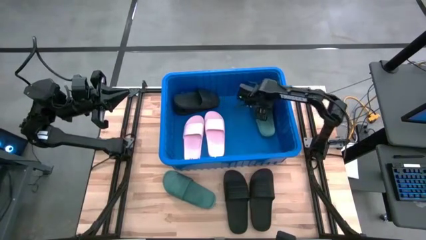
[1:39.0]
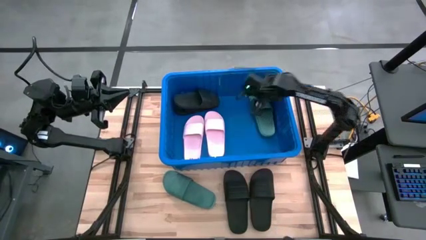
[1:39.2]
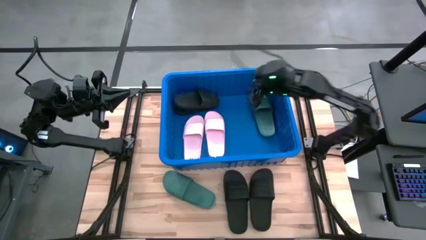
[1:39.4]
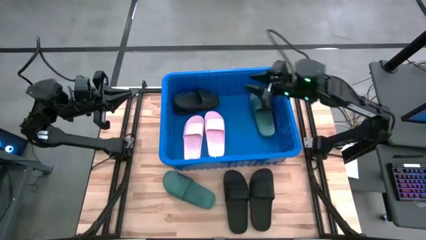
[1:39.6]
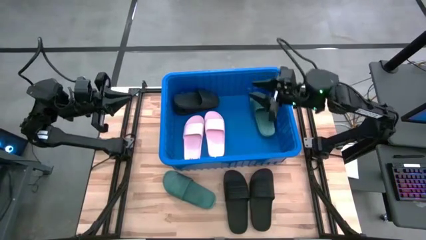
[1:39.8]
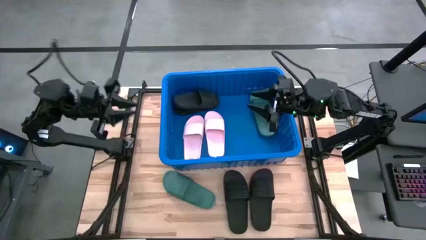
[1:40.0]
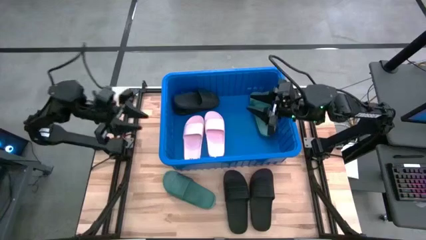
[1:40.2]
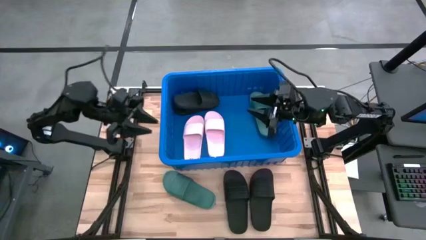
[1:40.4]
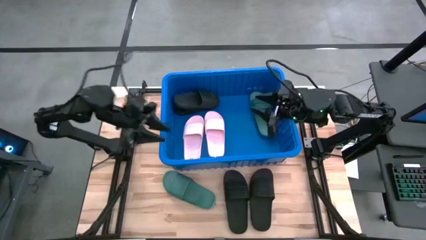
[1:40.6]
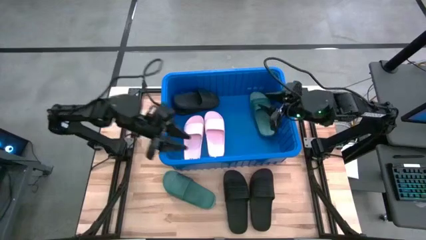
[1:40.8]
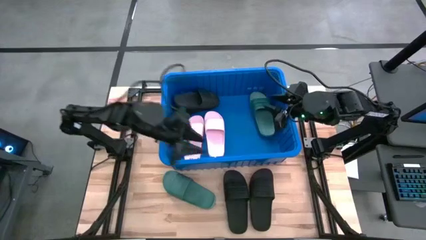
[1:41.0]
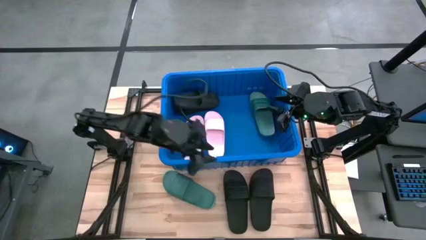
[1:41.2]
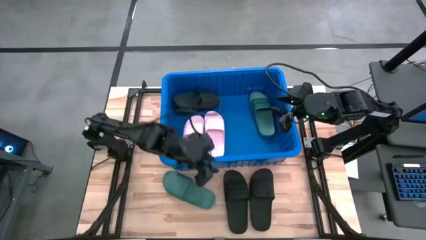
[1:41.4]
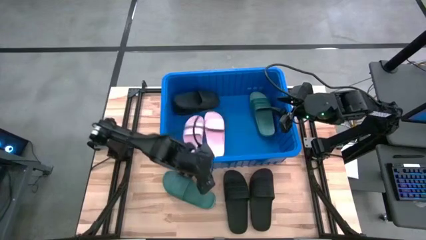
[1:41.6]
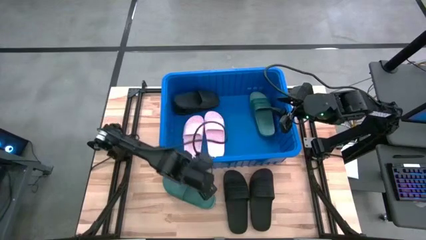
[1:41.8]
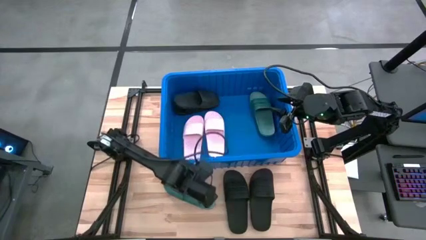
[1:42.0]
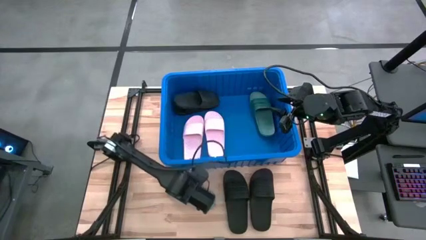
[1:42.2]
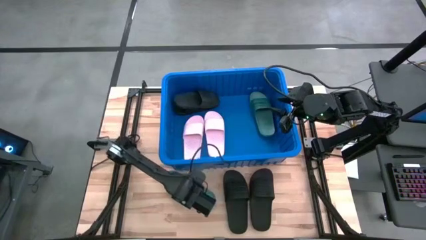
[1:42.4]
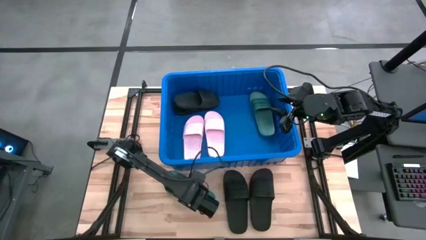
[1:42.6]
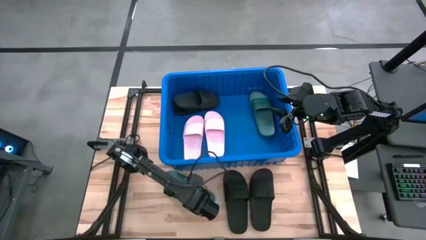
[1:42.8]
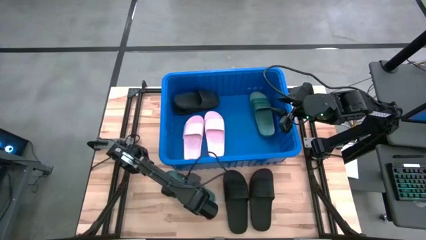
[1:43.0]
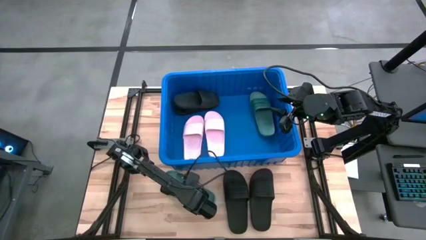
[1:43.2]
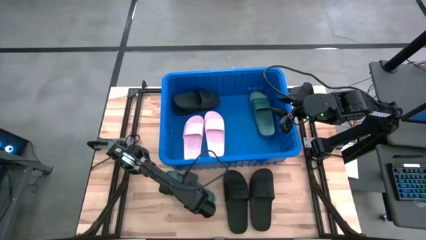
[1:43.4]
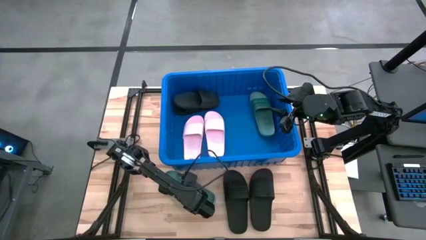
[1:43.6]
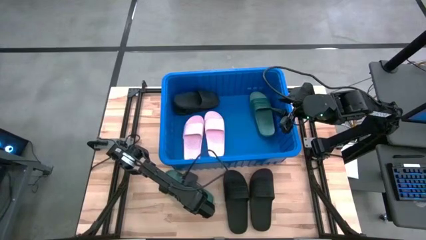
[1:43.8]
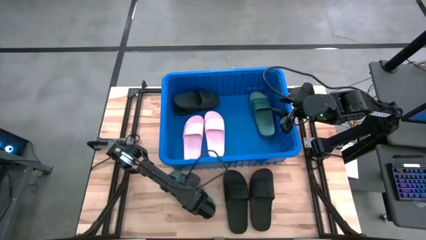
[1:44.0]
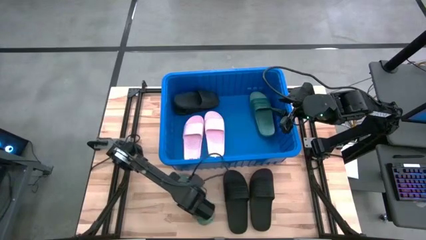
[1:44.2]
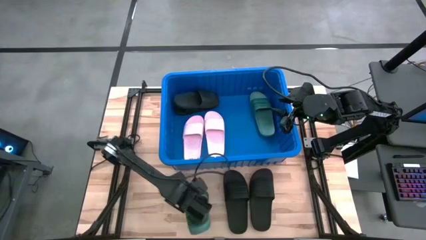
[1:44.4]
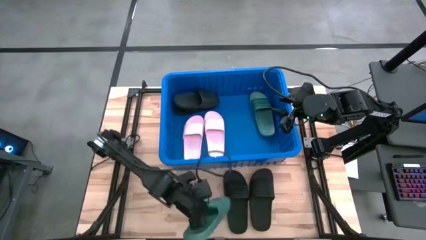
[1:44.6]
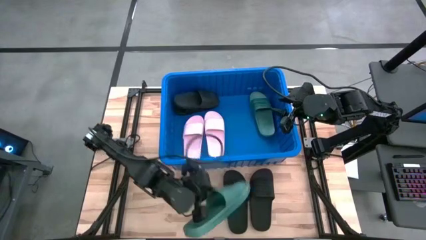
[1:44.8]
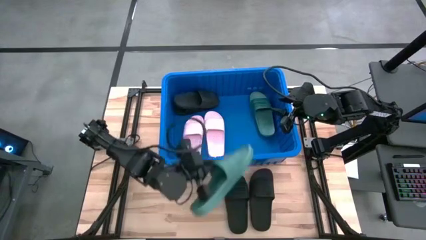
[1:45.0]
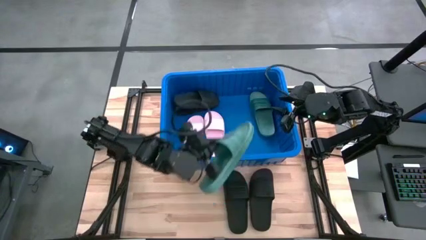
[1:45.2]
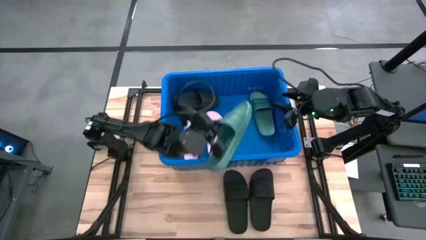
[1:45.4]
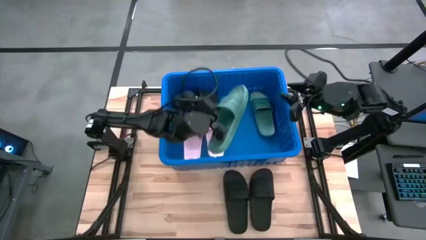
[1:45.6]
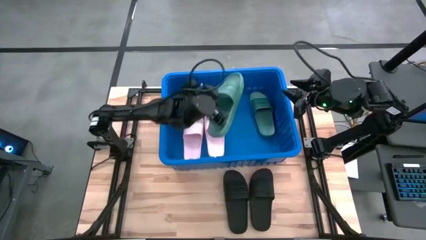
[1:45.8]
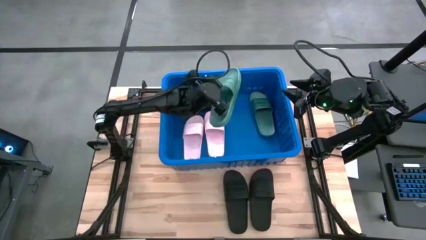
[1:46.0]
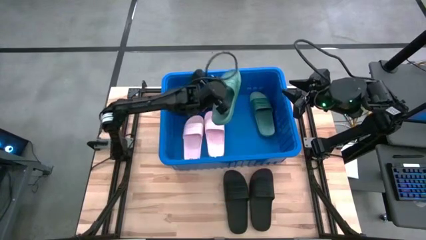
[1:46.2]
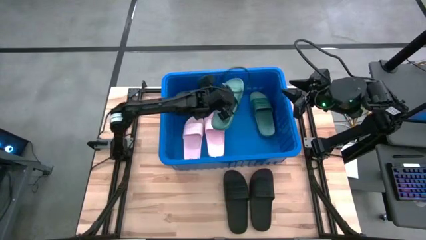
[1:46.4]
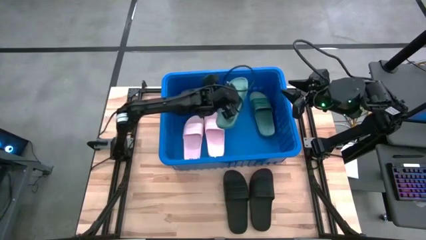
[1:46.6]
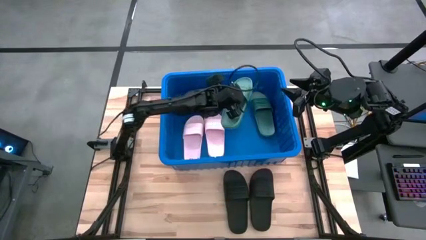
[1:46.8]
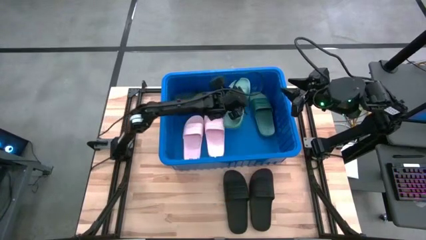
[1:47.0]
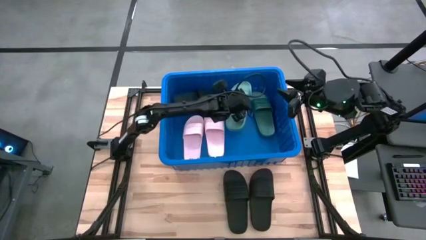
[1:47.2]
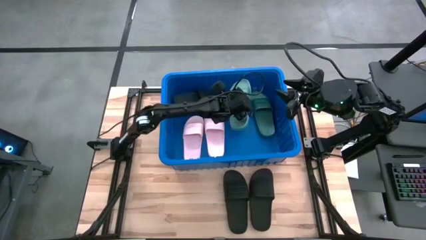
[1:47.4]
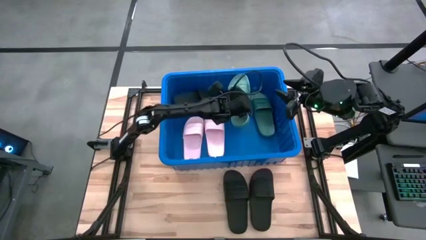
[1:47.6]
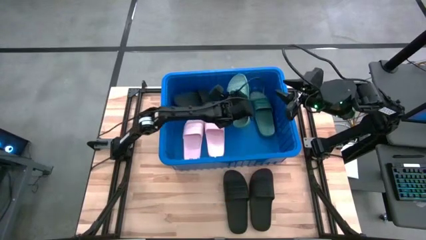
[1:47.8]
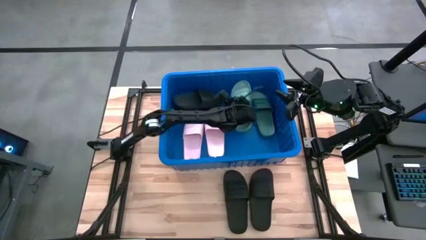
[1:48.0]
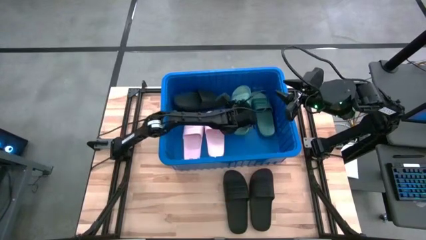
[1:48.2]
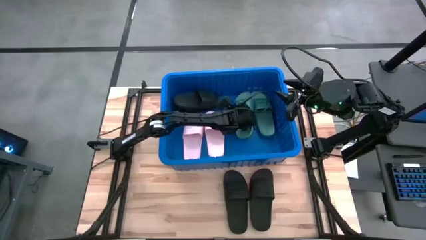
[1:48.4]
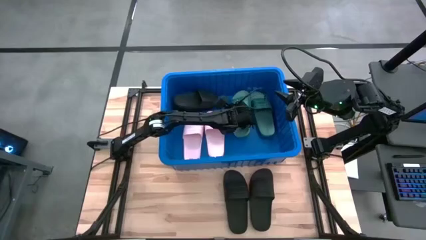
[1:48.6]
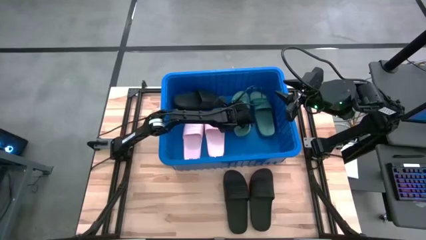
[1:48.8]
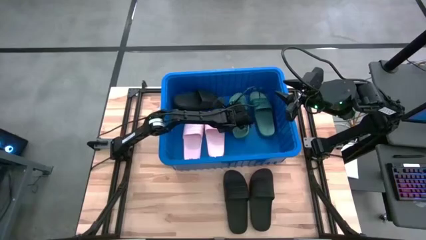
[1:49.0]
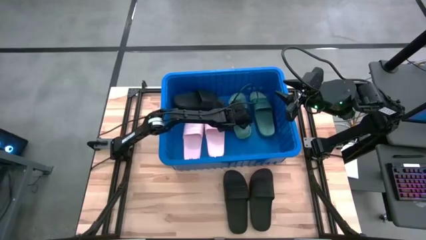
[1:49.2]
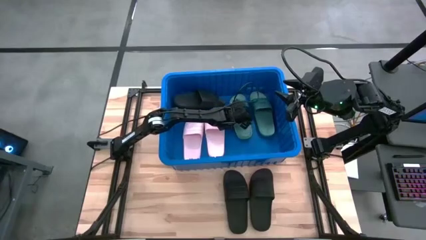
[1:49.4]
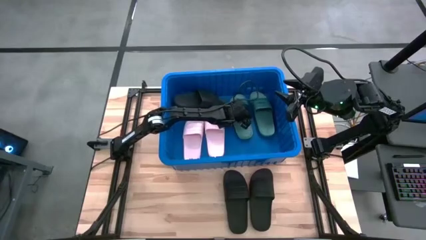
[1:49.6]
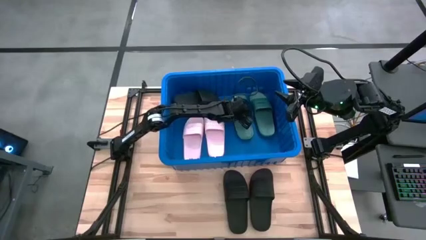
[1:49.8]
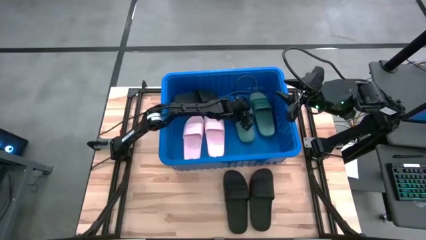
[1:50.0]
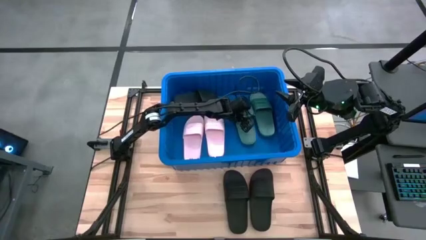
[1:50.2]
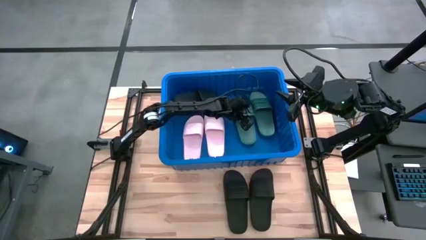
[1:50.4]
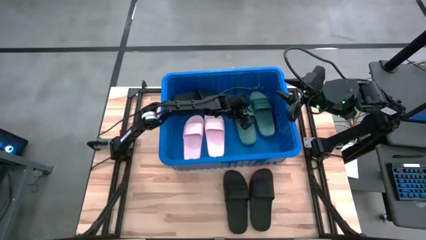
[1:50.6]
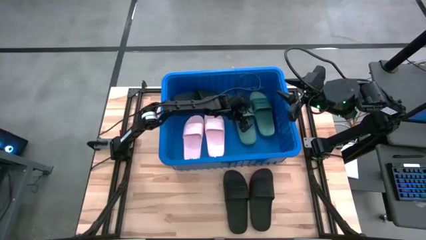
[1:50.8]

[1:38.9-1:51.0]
Task: Pick and place slides into bin
Put the green slide into the blue container

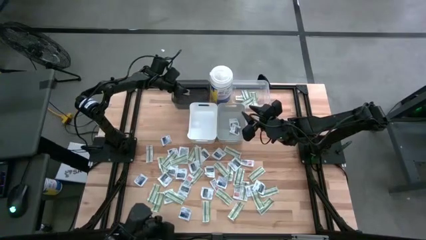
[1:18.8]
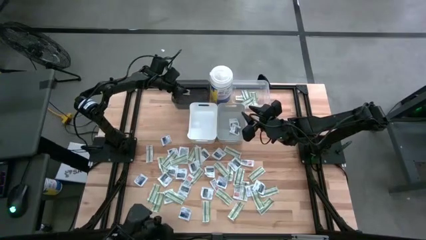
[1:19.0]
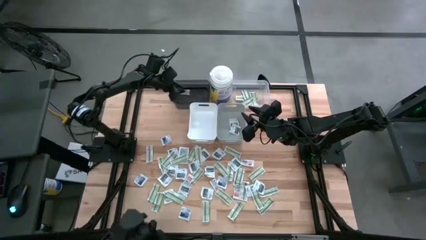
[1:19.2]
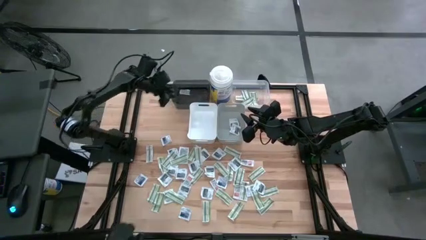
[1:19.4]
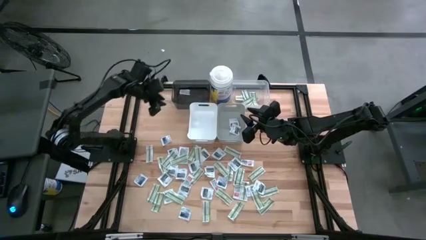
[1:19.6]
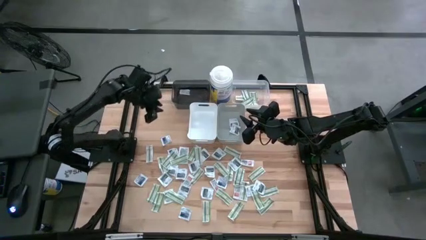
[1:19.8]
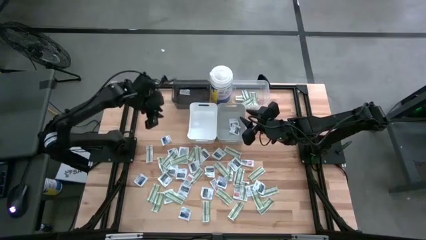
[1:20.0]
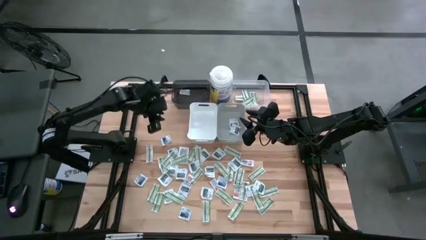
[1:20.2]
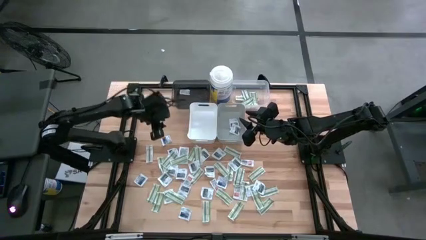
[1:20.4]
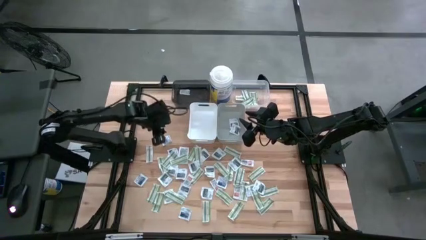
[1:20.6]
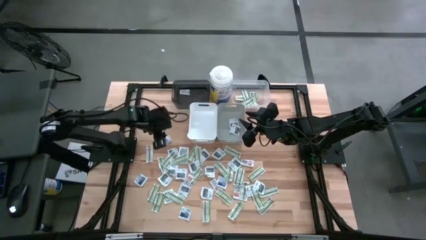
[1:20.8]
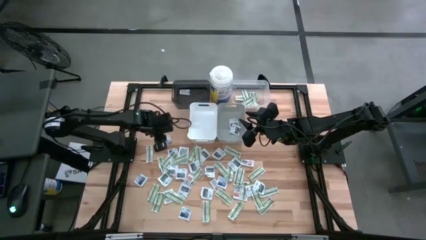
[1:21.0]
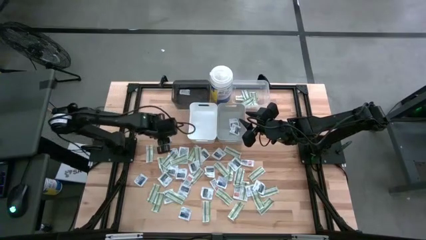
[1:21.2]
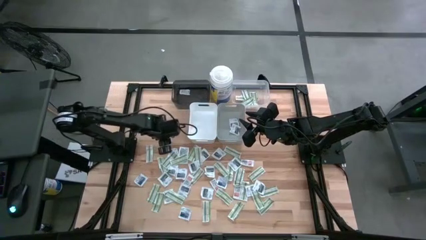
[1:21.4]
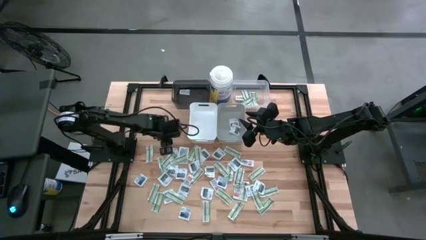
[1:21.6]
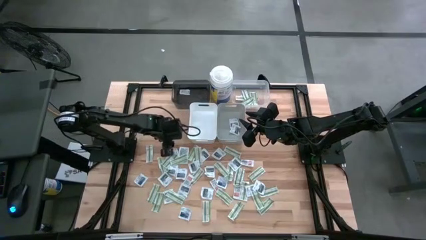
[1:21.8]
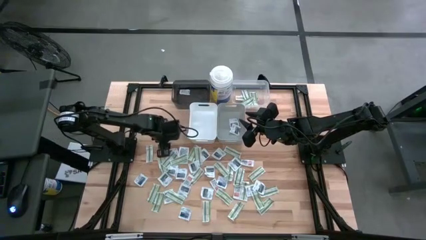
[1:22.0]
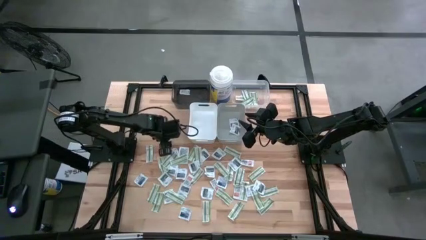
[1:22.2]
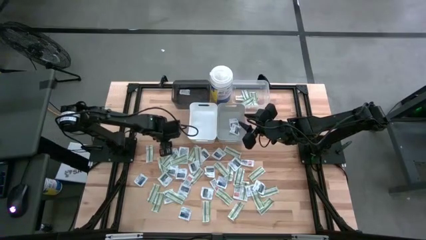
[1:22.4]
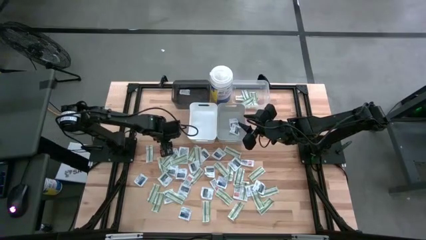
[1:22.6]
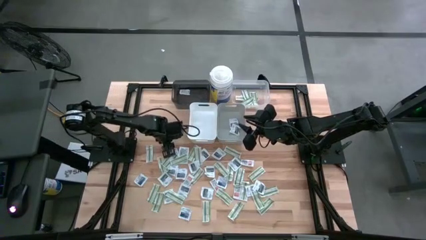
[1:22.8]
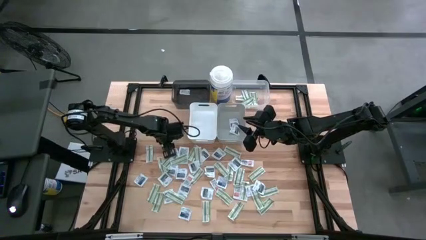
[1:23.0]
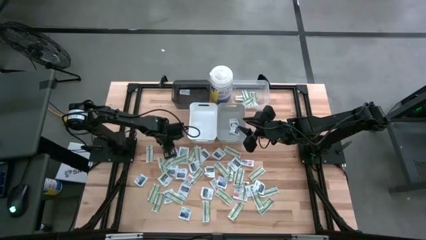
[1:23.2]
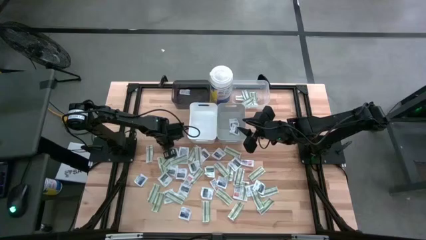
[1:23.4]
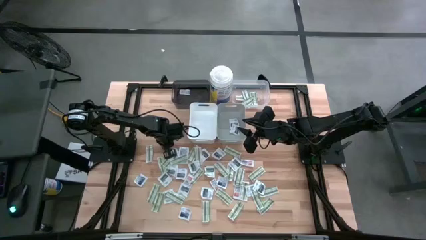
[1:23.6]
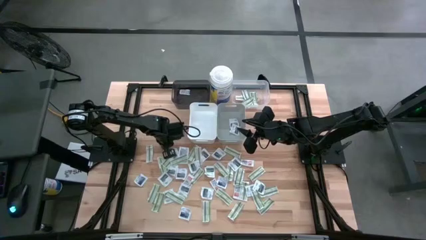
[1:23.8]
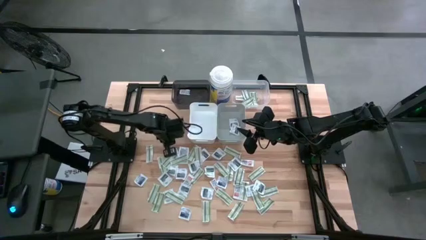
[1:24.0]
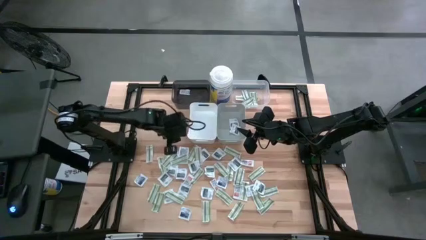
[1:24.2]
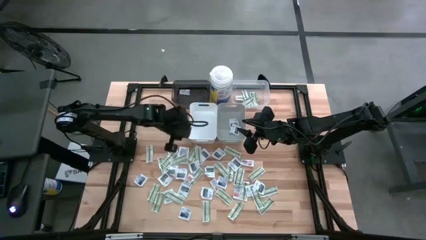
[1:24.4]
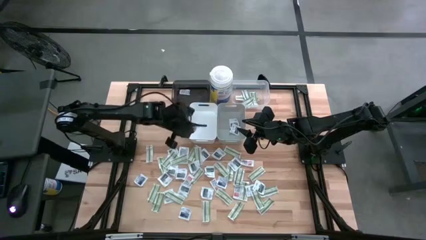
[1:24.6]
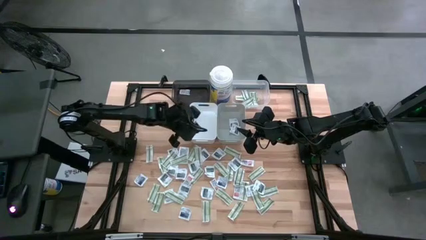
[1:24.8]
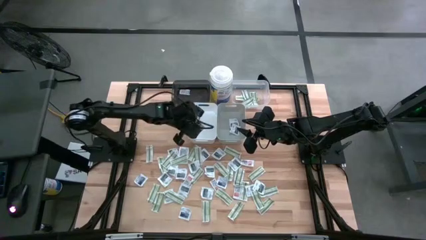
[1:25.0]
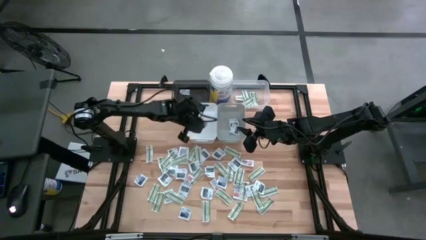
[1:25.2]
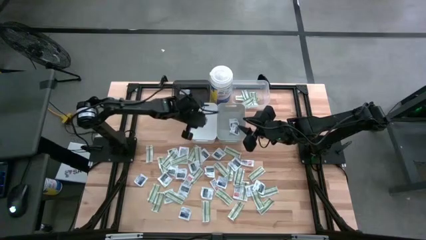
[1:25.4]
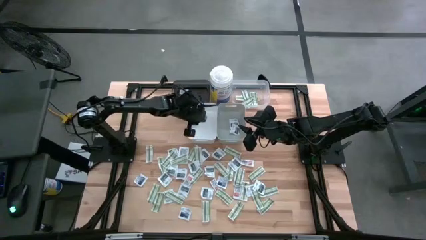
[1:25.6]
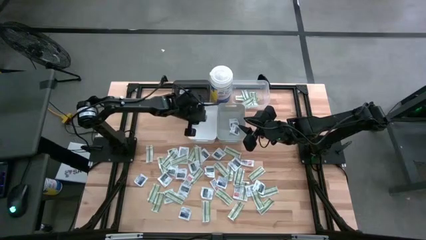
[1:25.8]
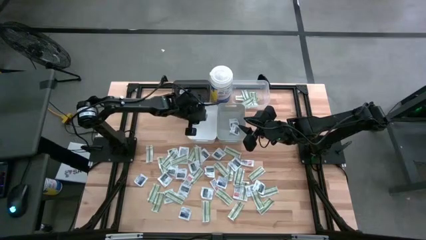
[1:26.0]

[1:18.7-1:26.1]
Task: Pick & Place First Aid Supplies
Put the alcohol wipe into the white bin
